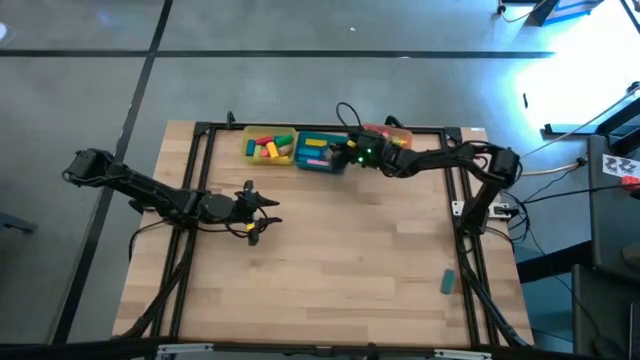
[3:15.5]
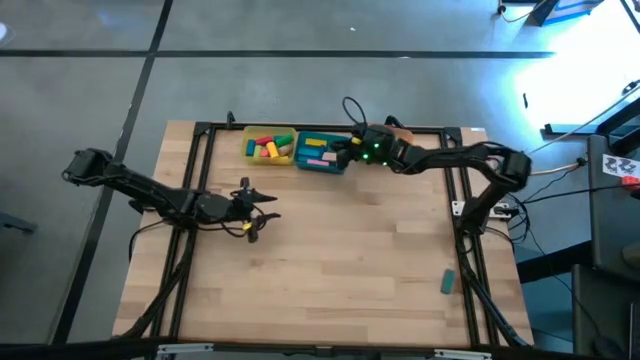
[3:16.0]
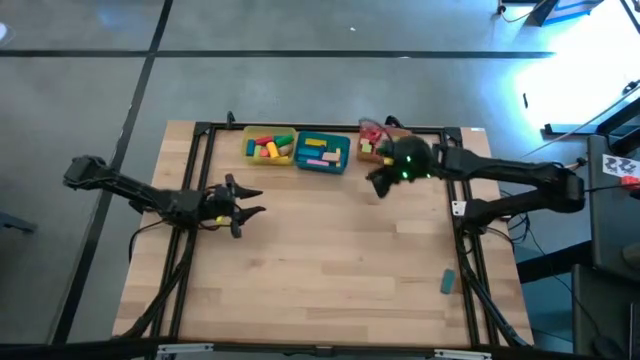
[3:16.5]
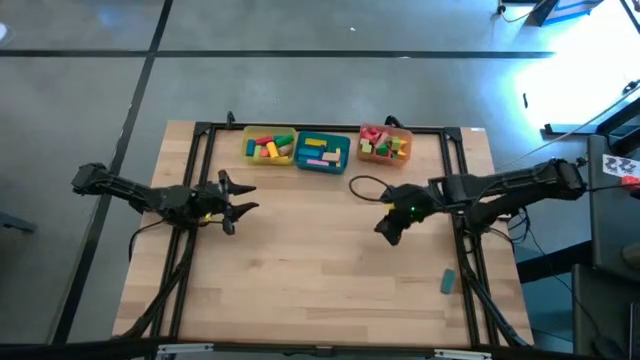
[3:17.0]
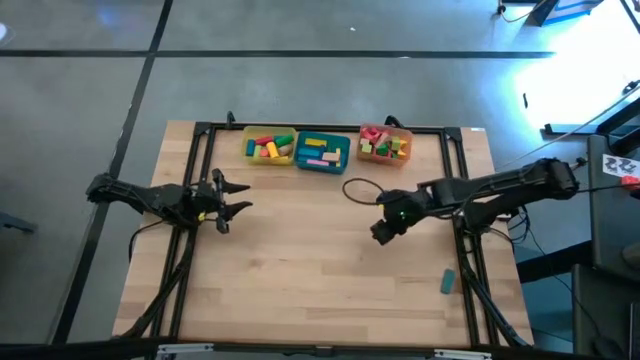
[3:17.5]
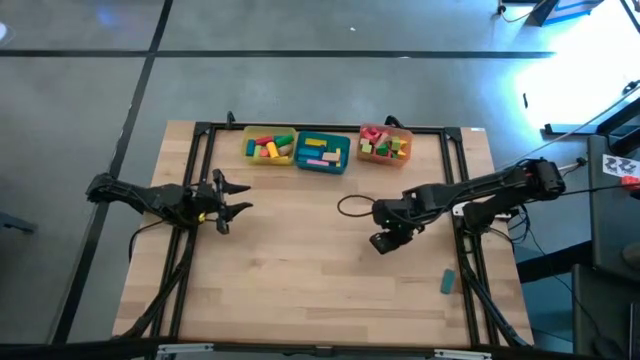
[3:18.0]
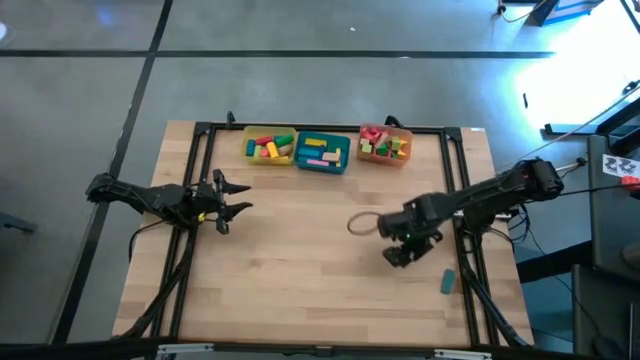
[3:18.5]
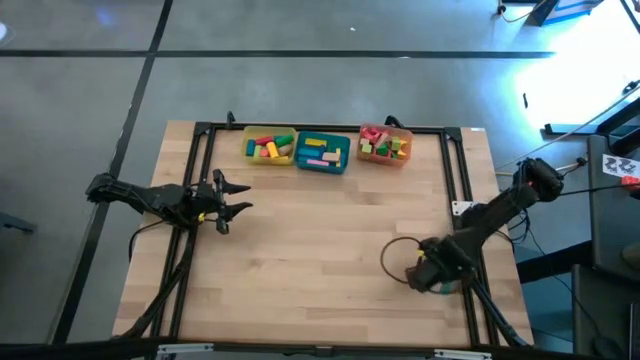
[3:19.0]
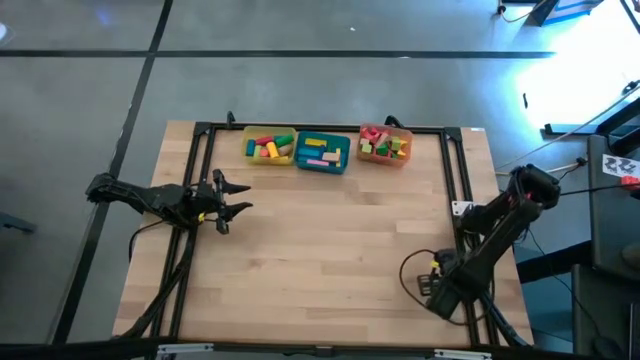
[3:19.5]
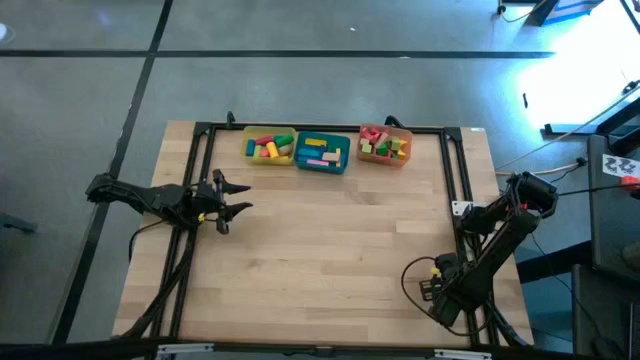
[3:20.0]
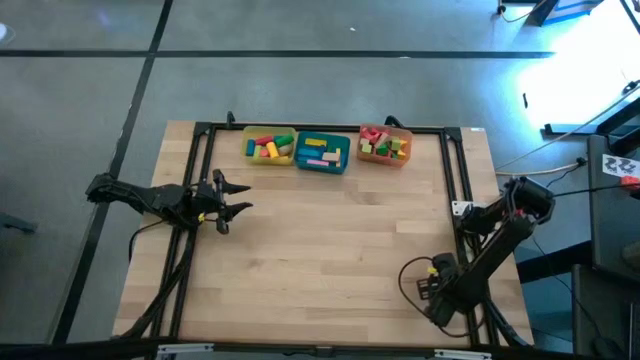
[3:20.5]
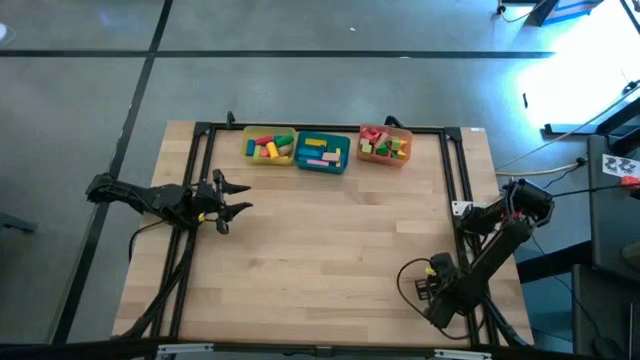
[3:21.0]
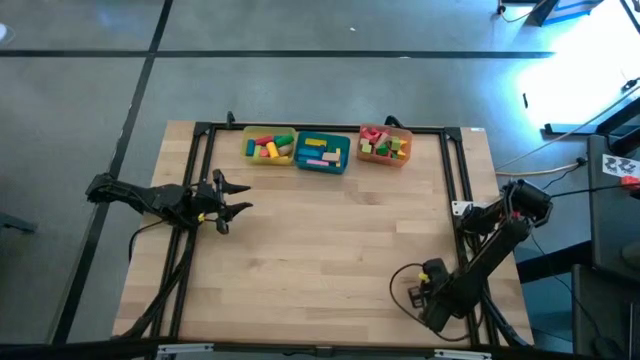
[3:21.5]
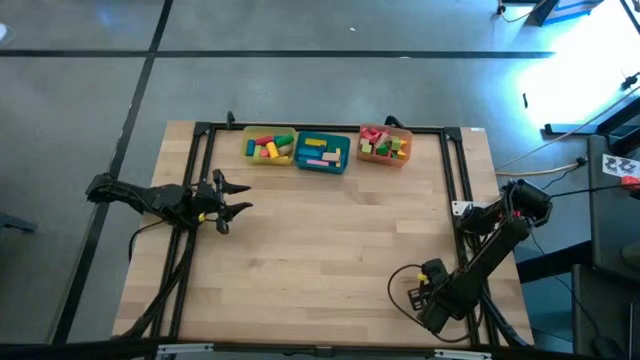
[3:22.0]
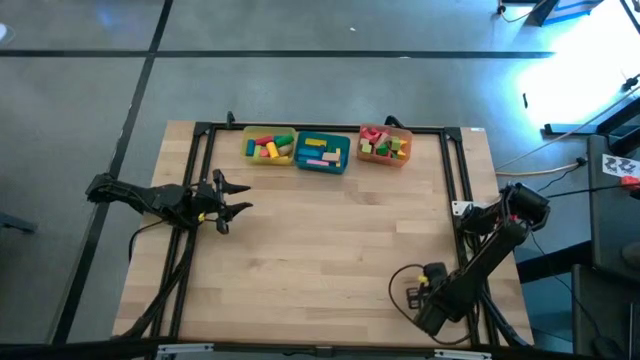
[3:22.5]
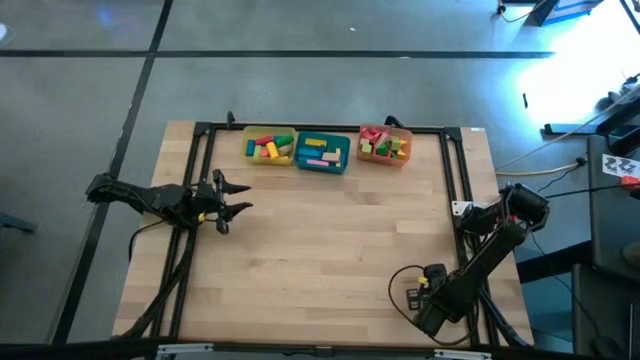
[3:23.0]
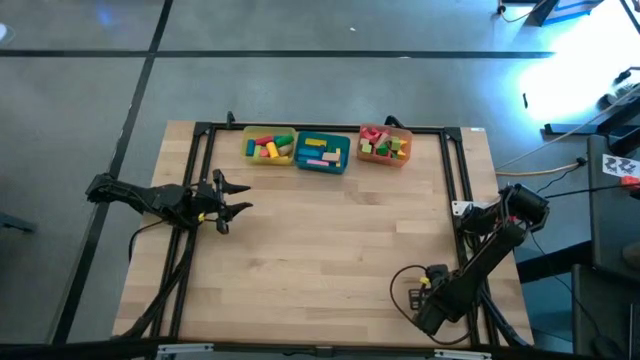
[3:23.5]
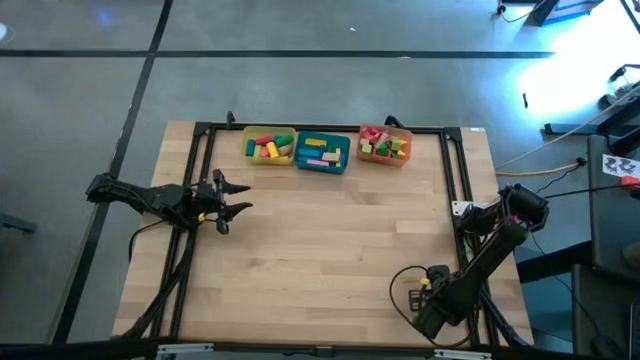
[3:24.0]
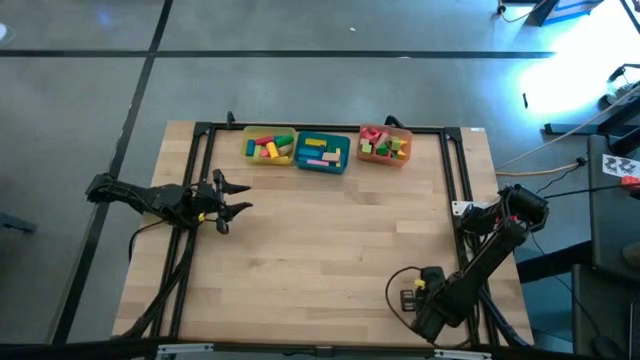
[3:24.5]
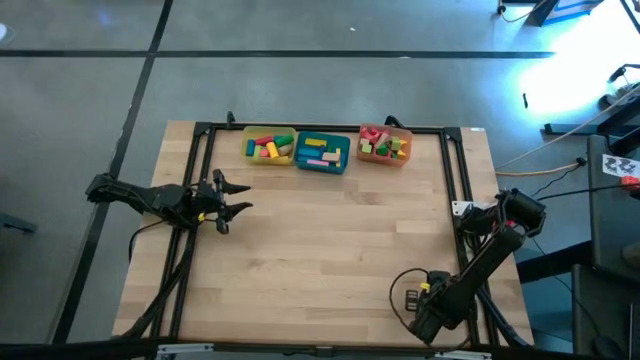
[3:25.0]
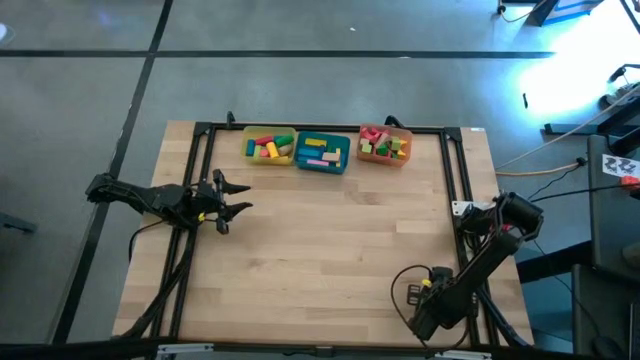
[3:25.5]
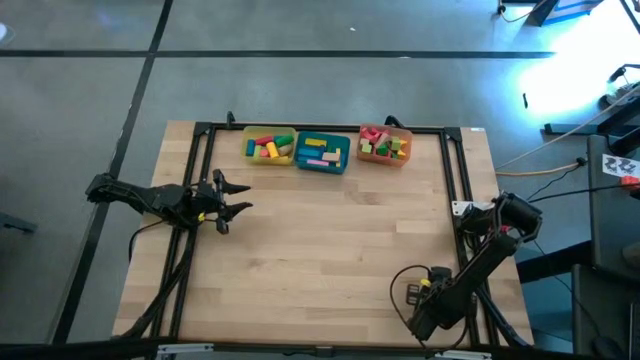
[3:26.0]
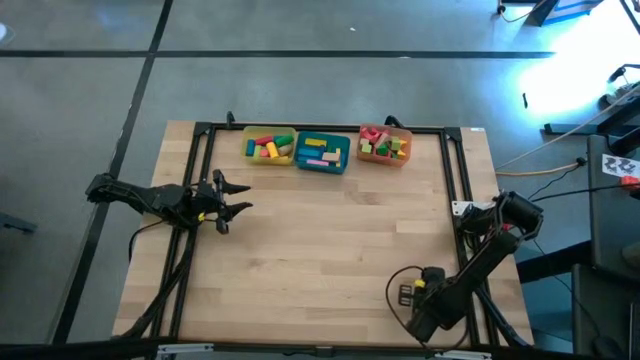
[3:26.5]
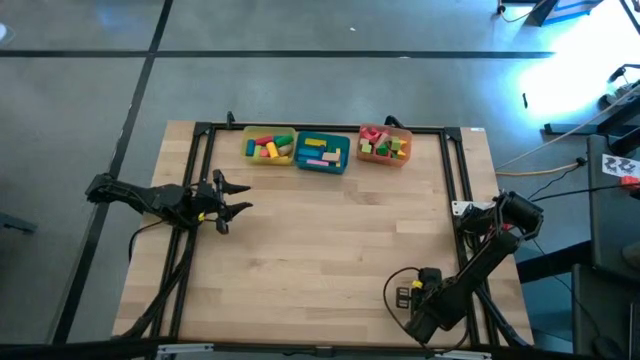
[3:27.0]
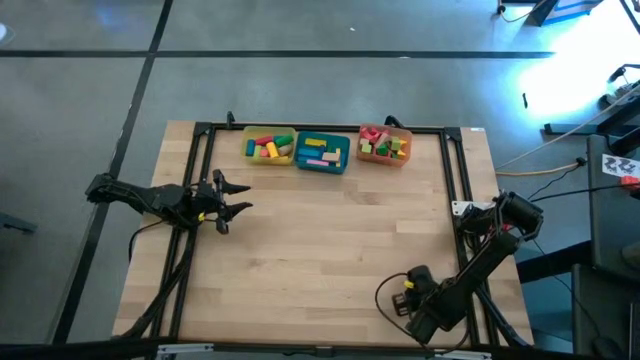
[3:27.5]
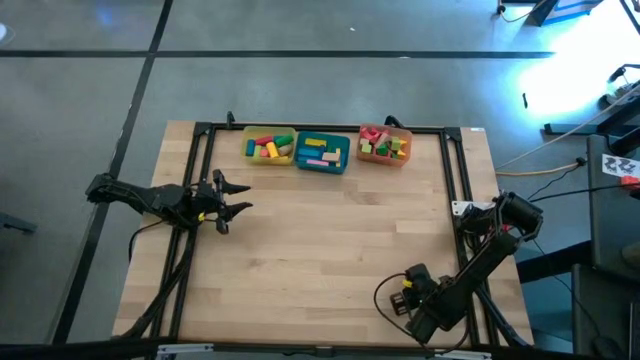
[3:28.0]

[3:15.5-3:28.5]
Task: Sort blocks by size
Put the blue rectangle block into the blue bin

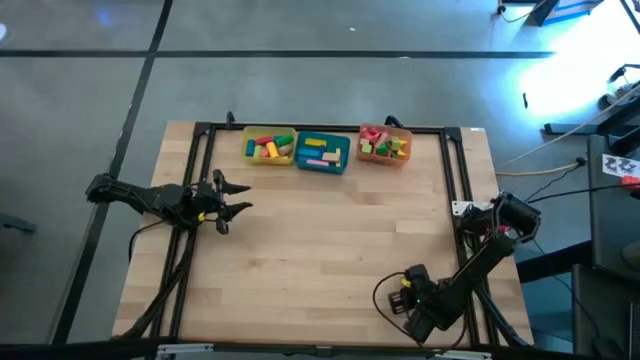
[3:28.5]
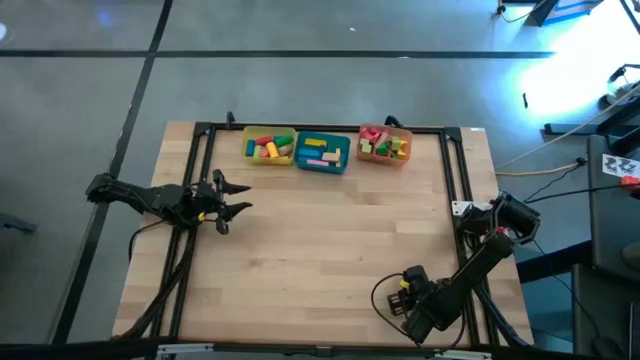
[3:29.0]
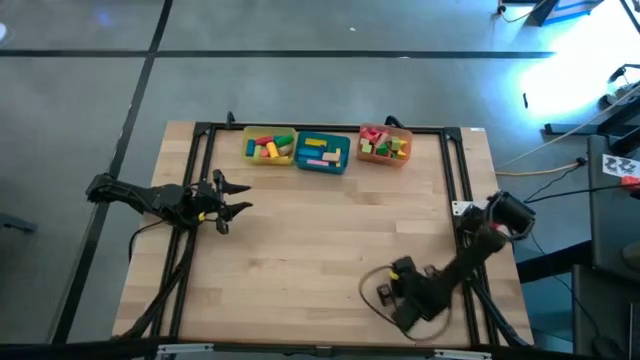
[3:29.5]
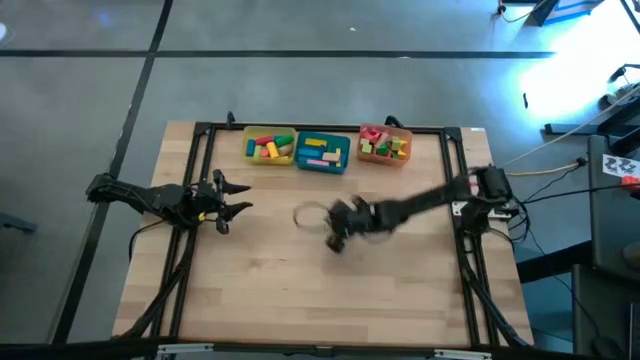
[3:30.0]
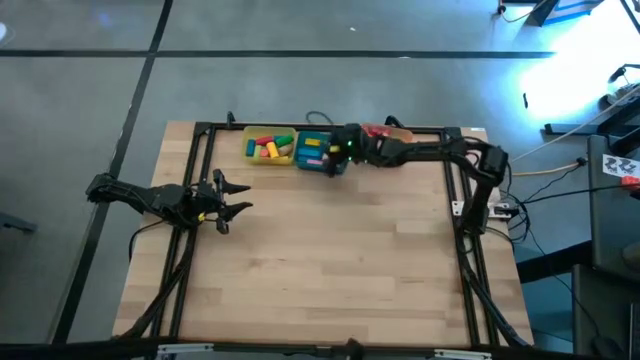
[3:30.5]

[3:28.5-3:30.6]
Put the blue rectangle block into the blue bin

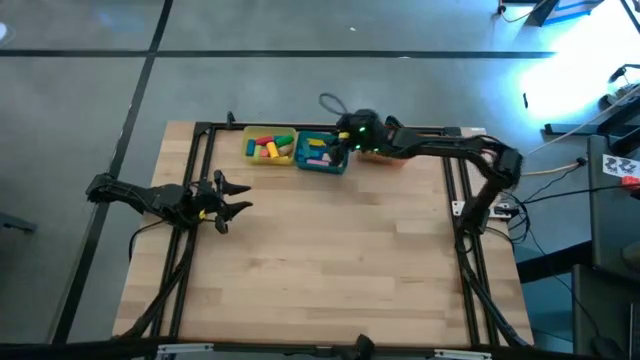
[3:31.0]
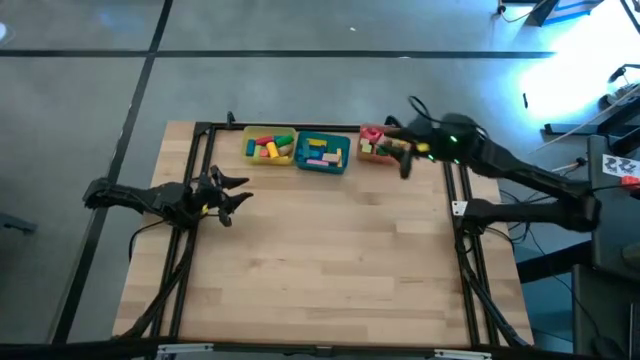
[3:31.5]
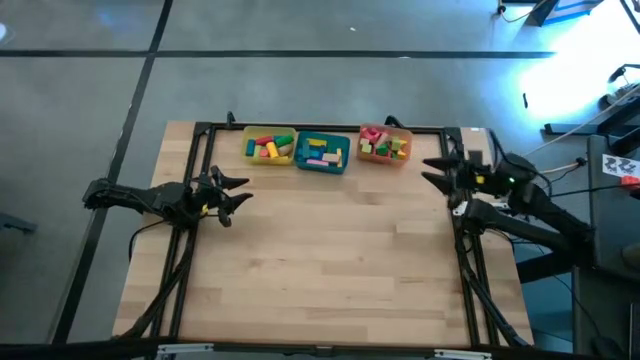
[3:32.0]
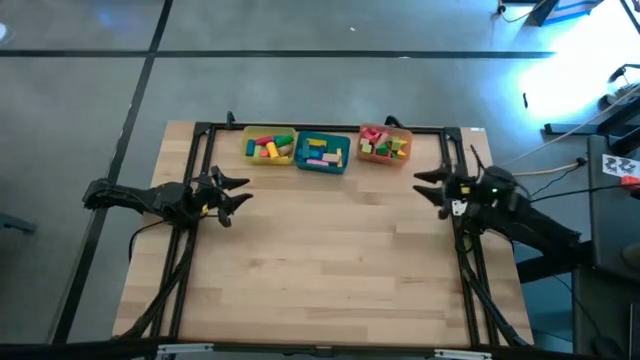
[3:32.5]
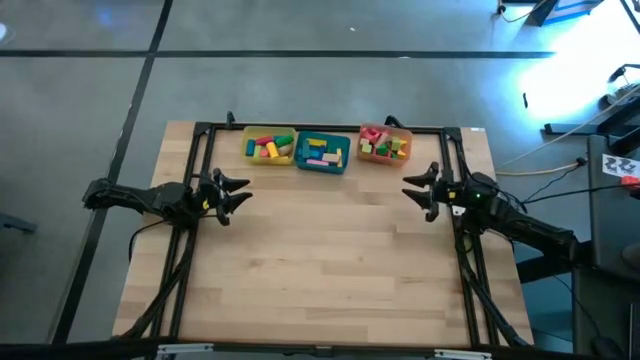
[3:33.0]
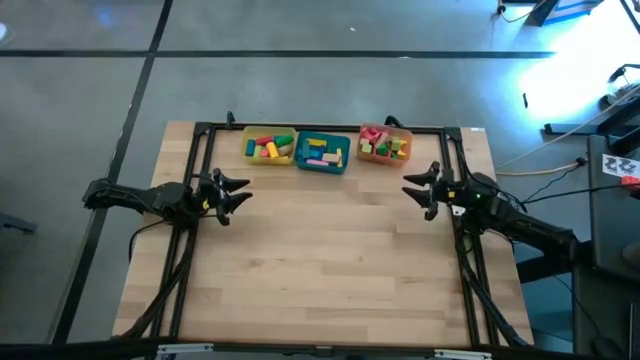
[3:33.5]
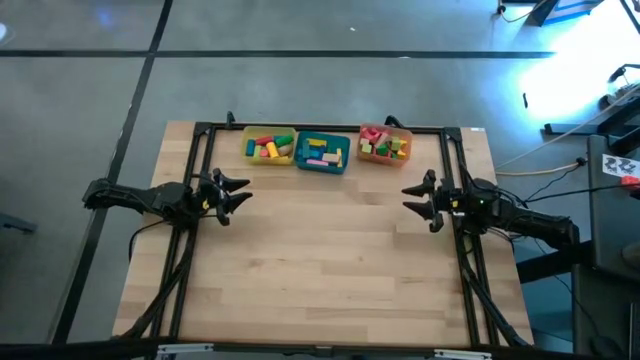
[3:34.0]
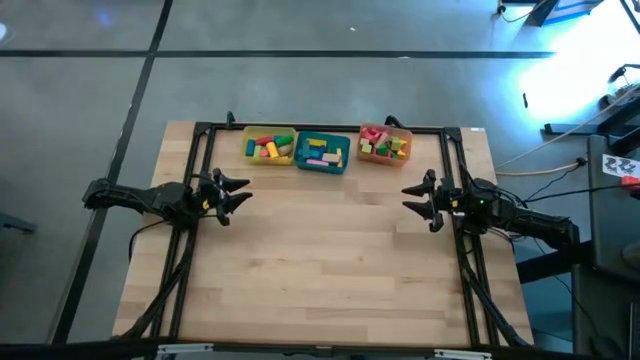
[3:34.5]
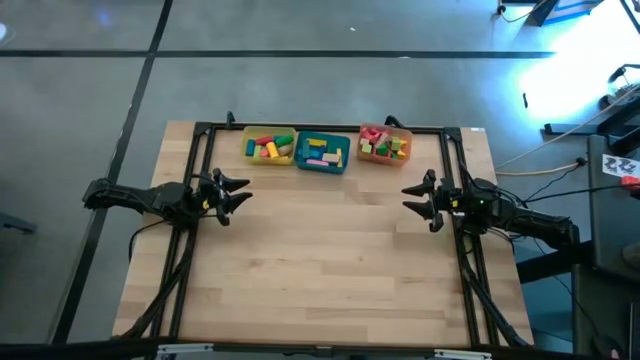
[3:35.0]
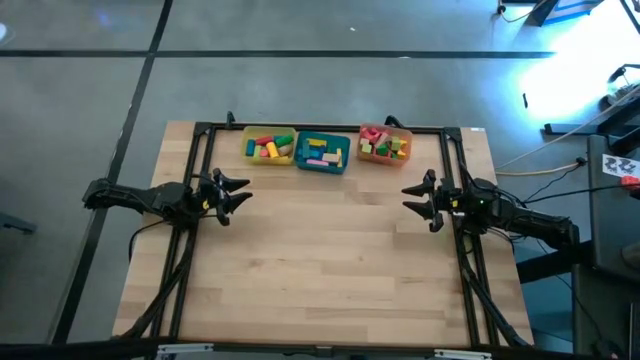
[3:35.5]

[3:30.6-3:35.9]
Return to Home Position

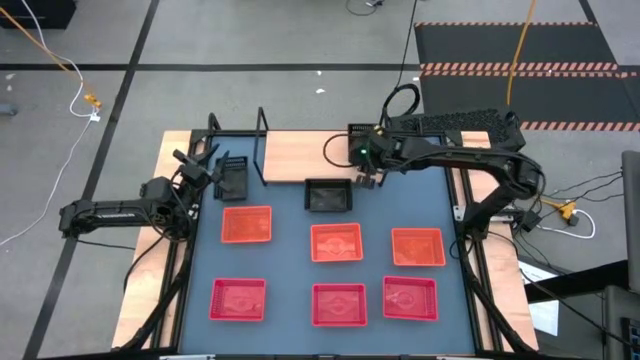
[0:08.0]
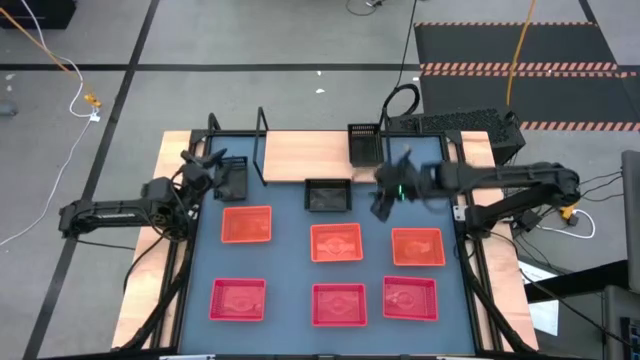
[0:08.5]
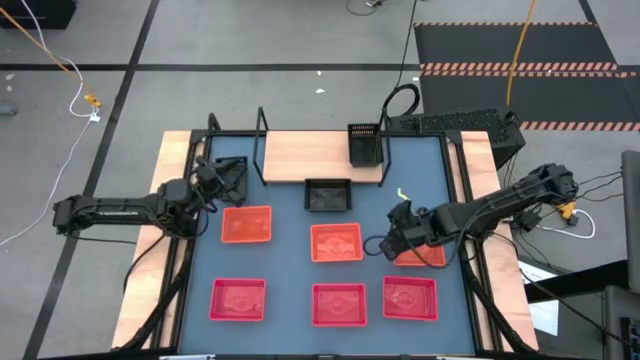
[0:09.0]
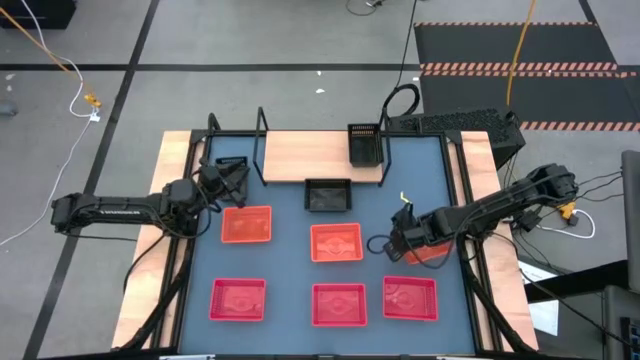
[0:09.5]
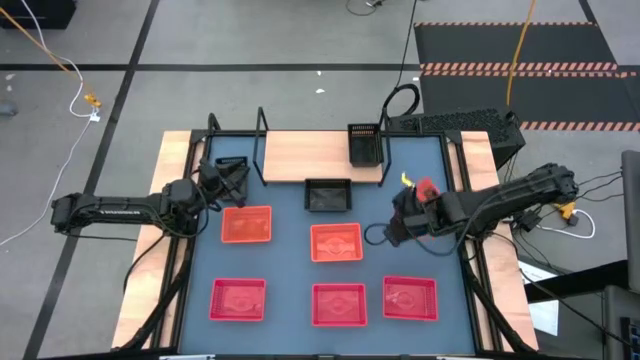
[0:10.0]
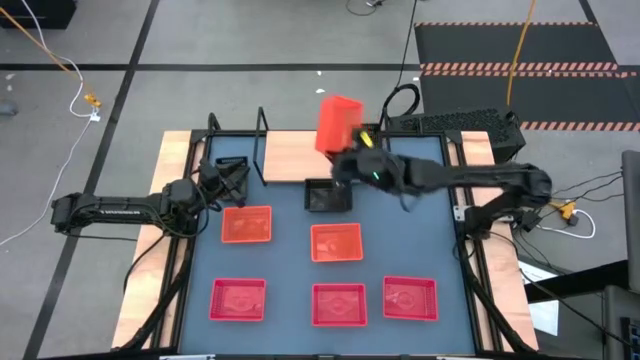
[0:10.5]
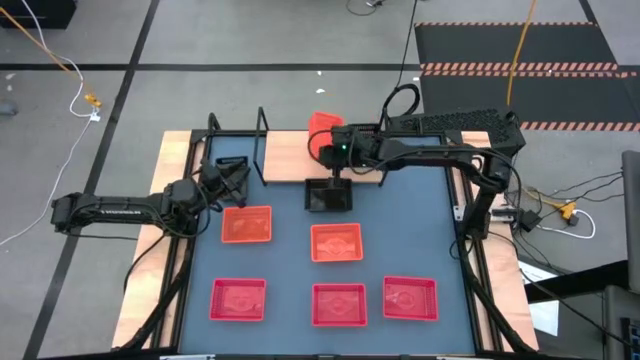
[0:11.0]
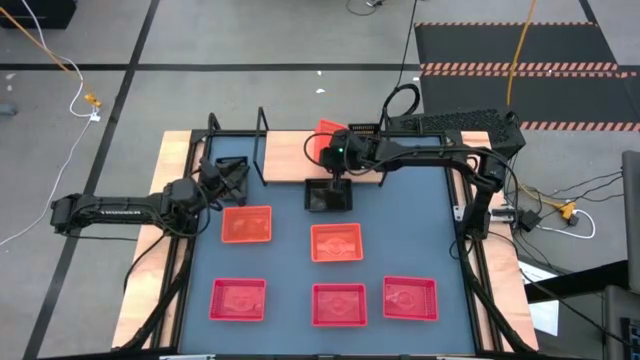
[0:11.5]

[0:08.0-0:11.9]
Task: Stack baskets on shelf by color
Put the right orange bin on the shelf
